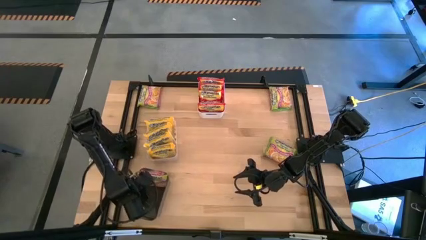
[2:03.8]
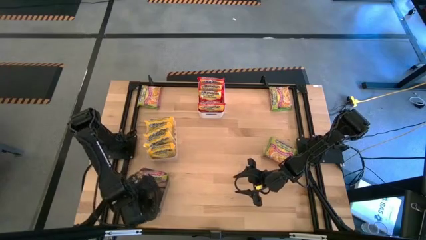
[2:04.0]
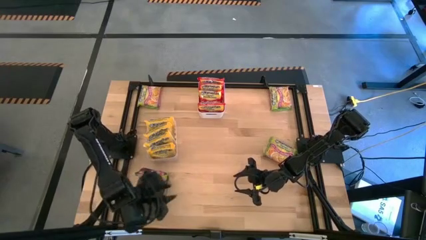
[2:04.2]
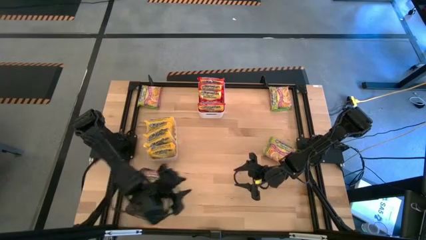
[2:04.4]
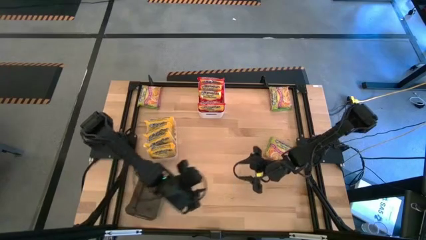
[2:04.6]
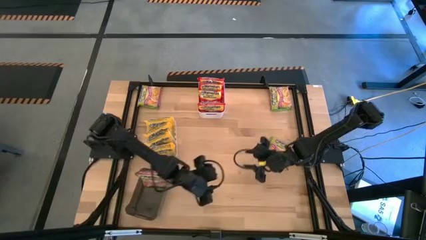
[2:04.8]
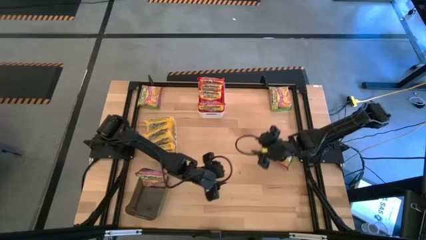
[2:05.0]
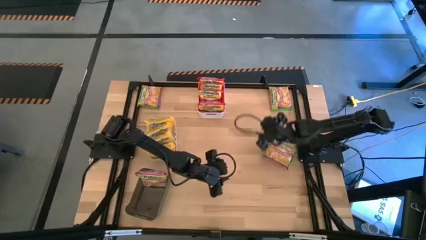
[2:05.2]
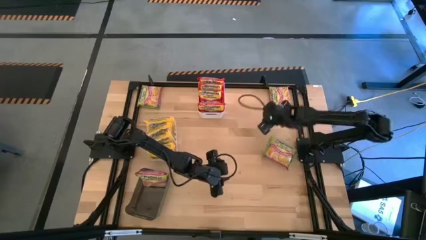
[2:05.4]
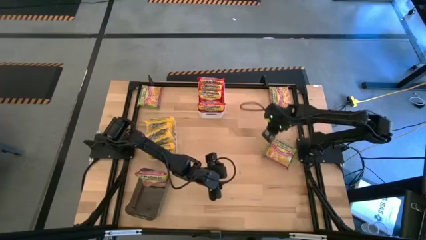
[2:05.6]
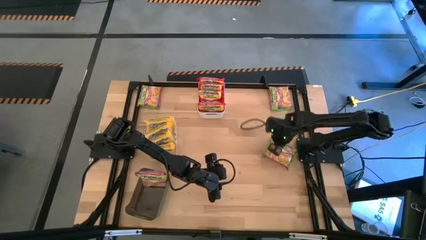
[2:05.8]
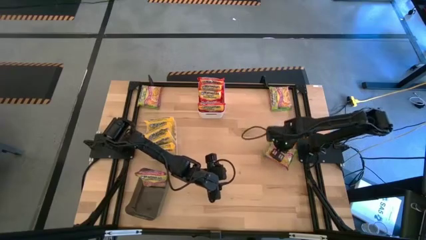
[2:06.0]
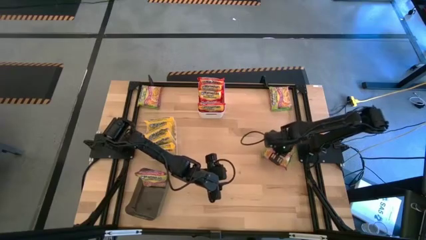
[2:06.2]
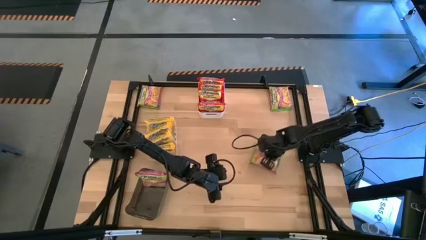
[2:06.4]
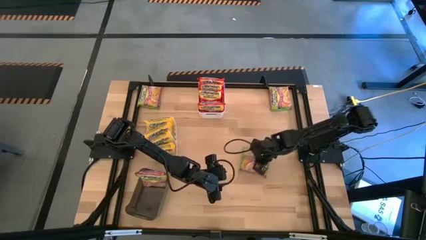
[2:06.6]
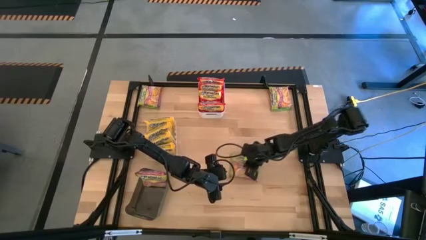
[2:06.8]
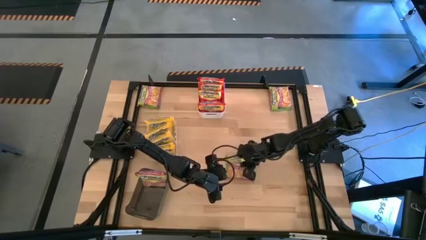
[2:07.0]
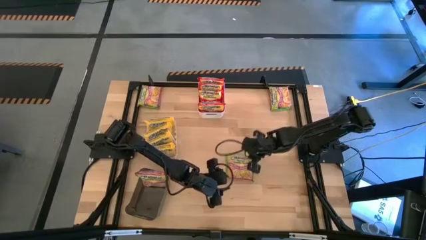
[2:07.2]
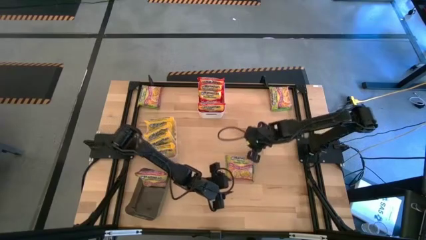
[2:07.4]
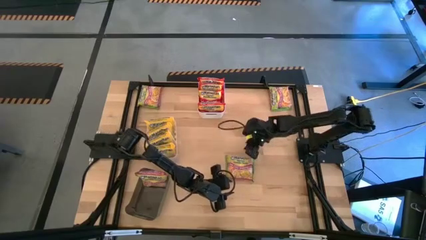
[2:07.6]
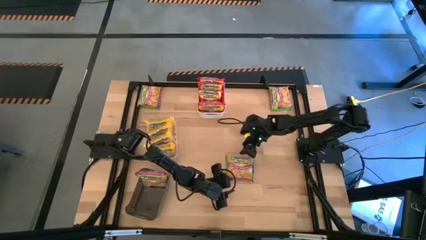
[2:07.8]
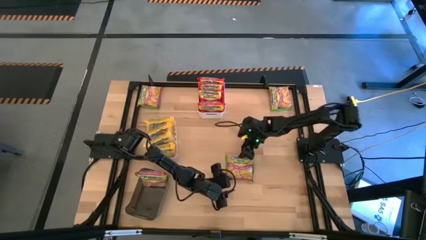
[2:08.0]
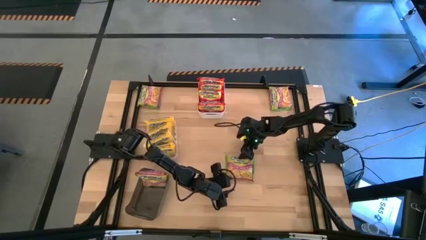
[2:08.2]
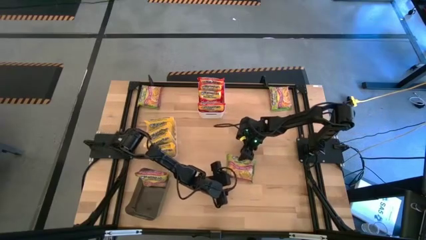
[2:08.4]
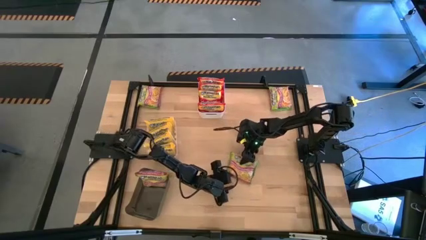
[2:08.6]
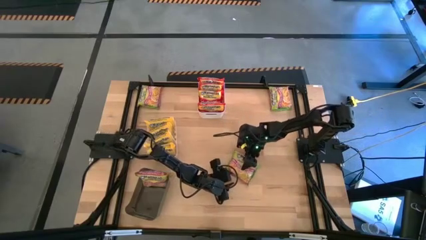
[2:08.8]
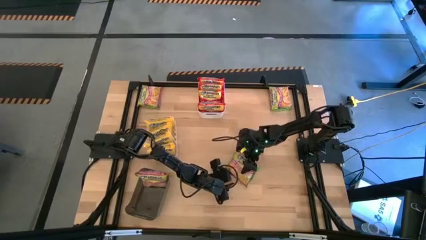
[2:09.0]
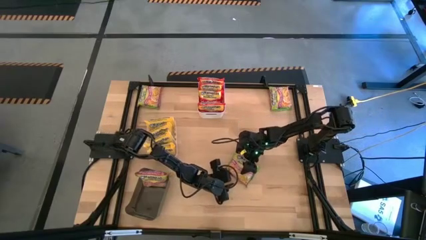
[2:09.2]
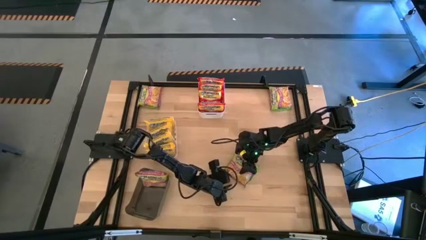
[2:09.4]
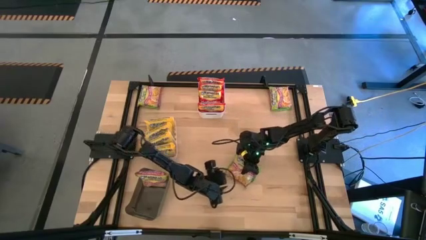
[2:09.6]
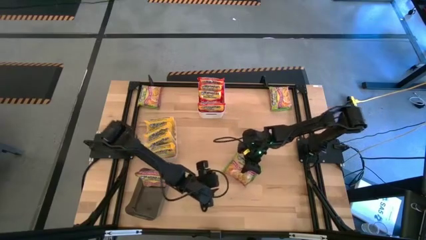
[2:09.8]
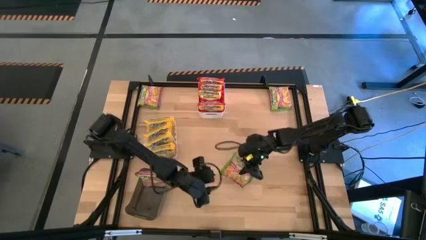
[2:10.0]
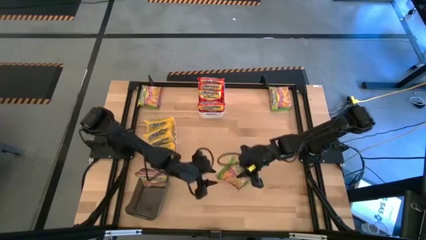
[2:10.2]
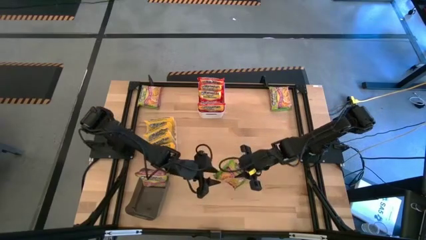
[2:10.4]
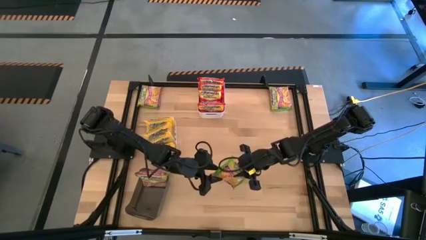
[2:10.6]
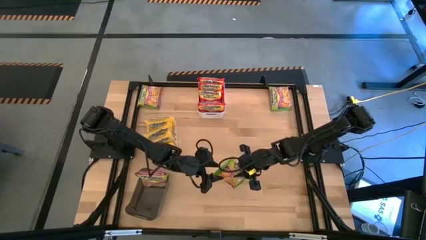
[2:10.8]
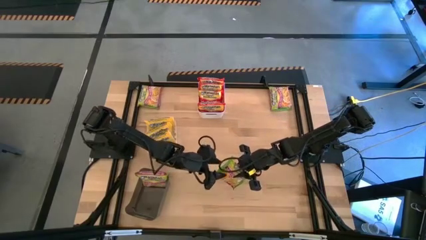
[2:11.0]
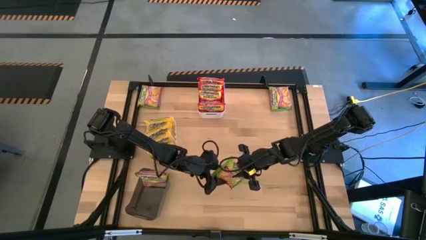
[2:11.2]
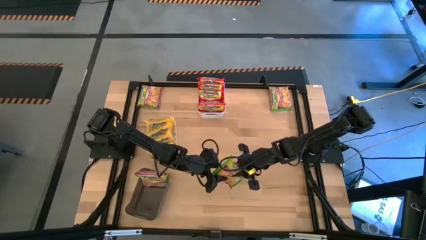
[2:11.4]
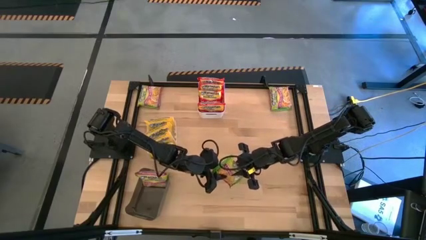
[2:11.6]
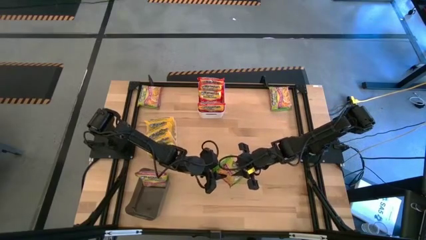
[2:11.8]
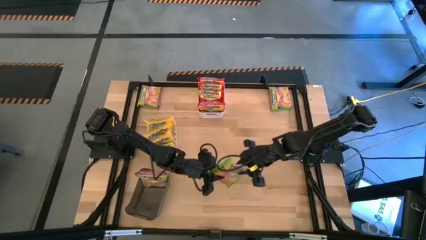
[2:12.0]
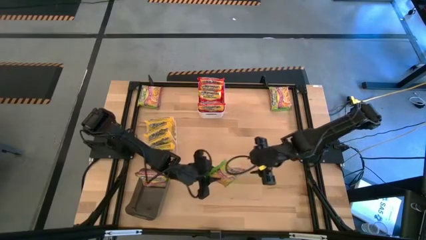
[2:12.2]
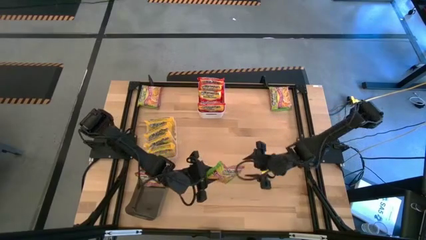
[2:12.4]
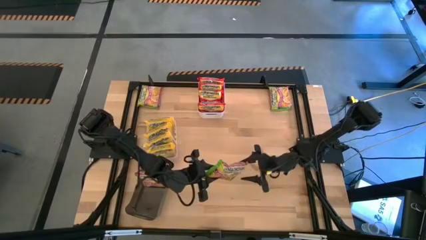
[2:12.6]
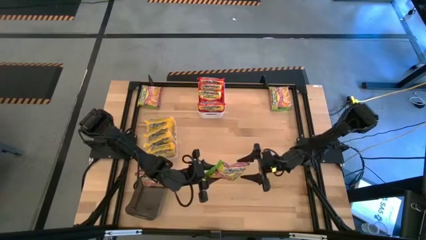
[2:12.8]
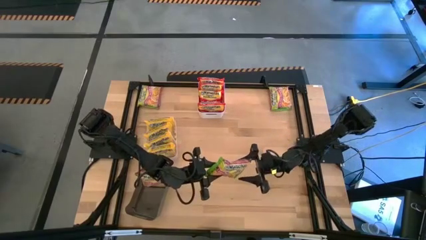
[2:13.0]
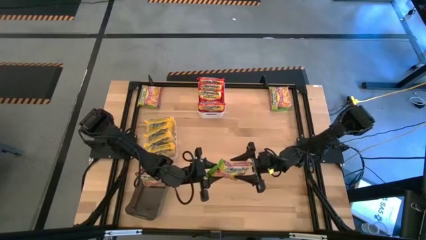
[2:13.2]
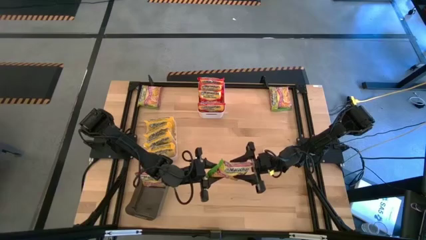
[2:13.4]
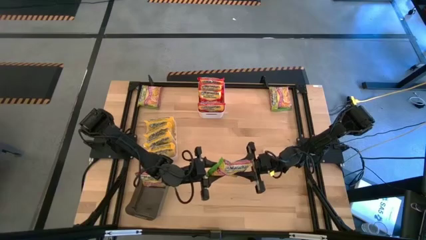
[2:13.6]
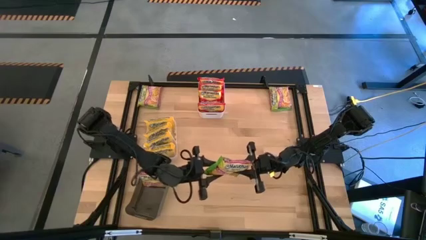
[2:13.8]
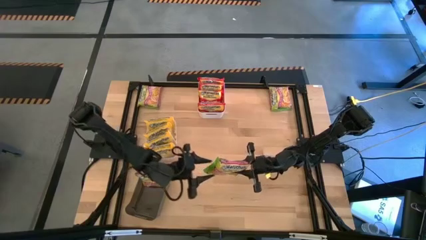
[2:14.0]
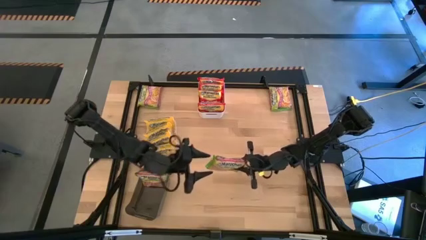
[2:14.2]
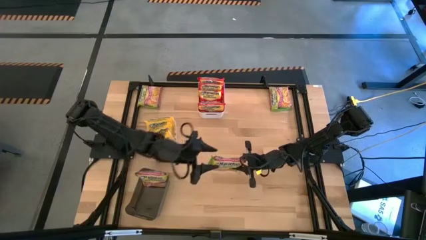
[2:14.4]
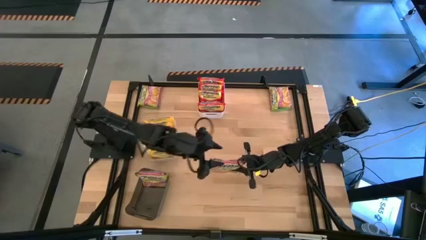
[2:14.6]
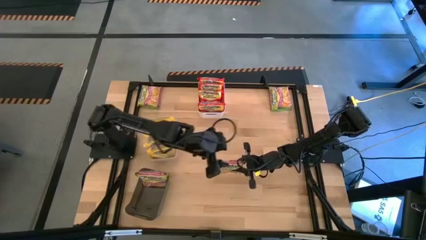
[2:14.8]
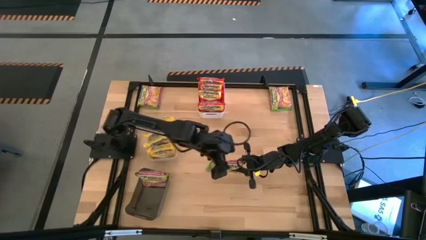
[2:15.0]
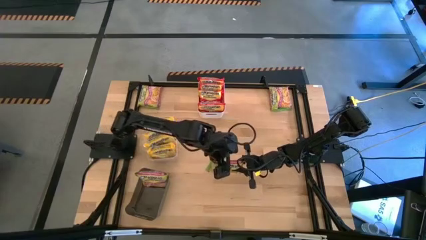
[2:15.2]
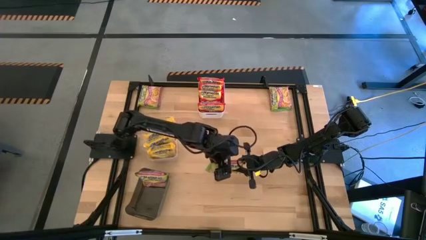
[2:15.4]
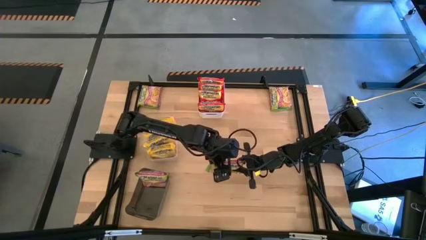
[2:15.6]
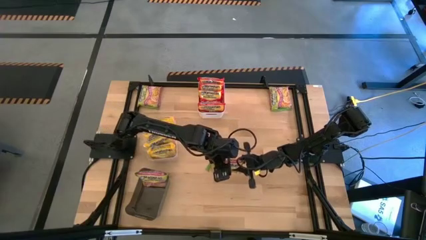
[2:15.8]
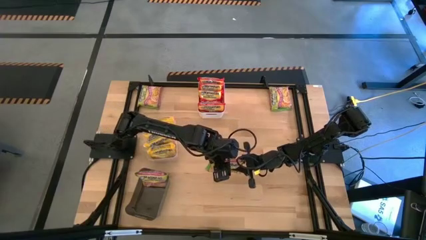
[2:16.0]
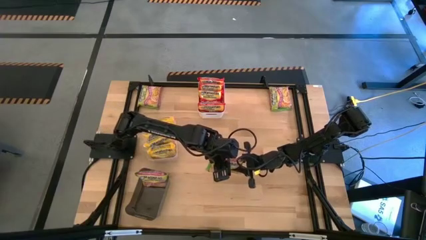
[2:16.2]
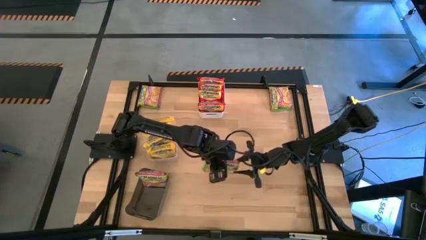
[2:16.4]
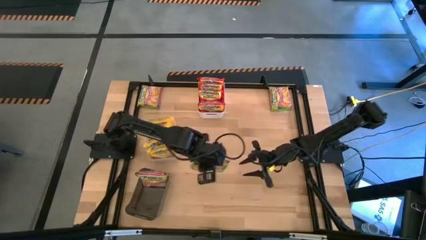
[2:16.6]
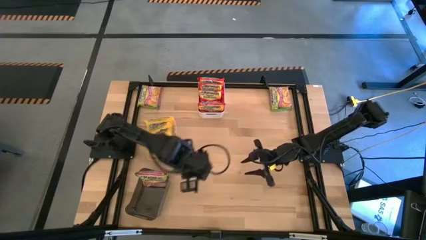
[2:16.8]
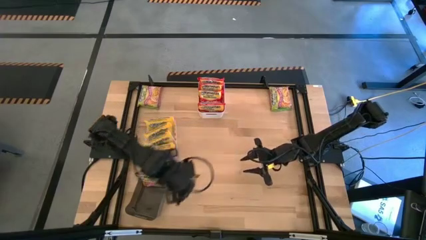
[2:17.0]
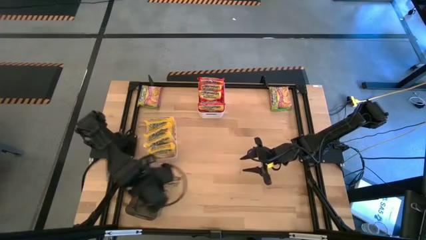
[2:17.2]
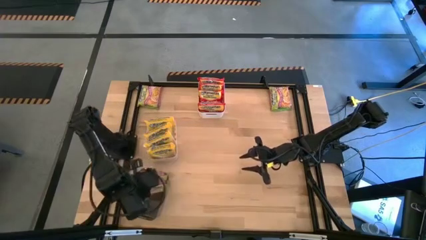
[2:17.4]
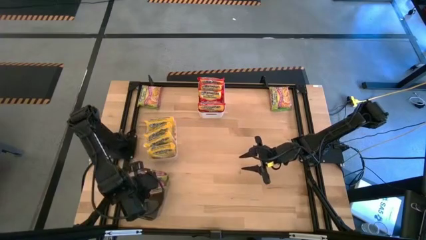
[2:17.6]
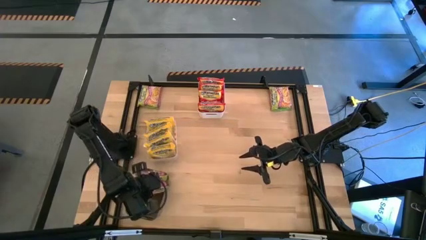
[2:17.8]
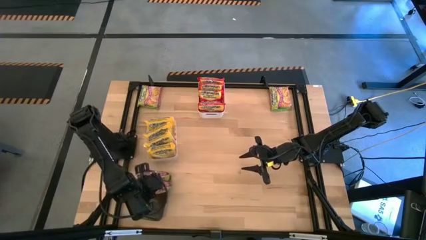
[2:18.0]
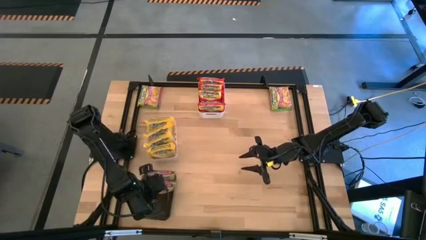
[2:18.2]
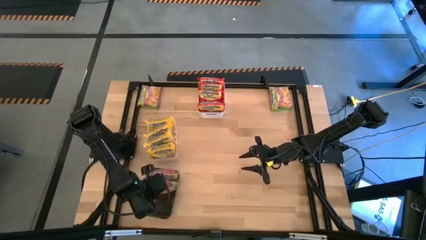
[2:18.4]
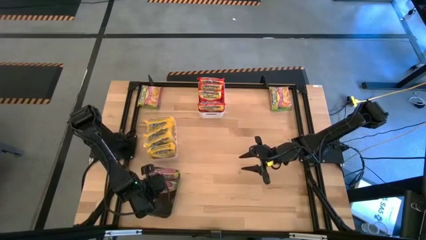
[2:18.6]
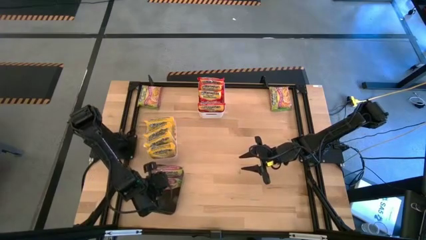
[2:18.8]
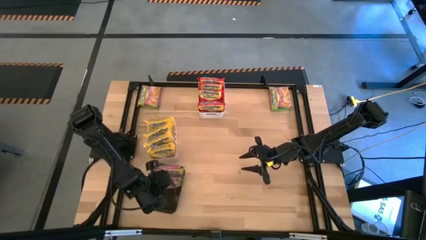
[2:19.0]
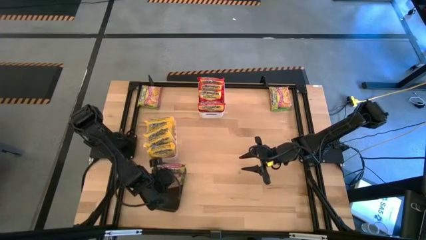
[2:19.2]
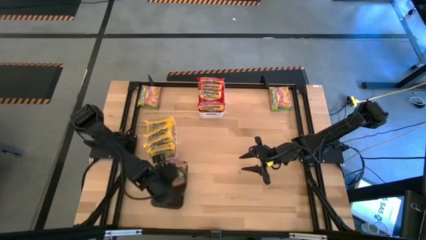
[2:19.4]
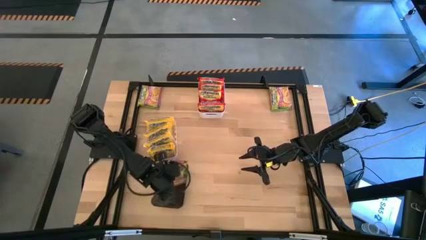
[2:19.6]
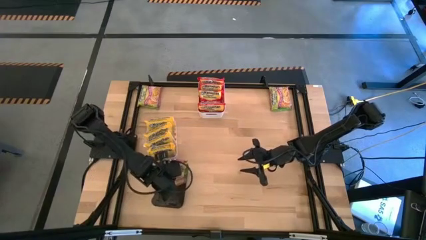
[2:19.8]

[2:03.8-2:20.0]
Task: Sort Maruchan noodles
Put the green noodle pack into the black bin

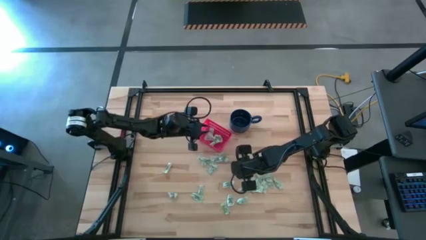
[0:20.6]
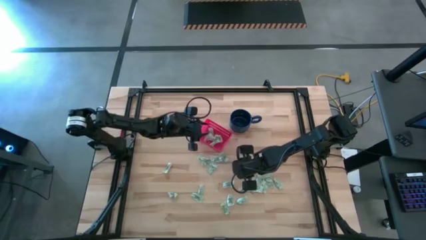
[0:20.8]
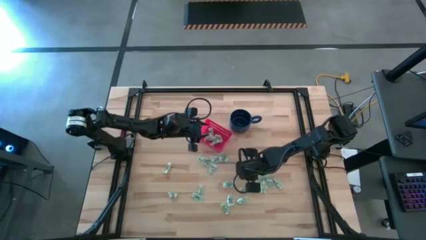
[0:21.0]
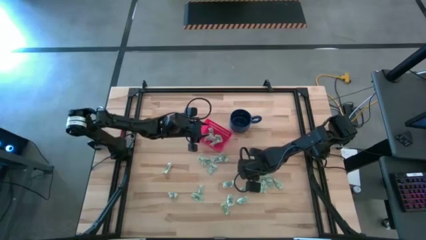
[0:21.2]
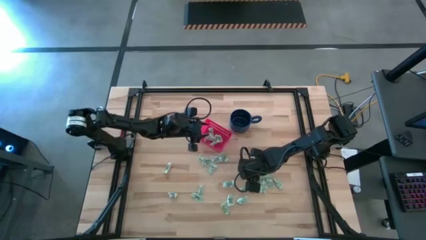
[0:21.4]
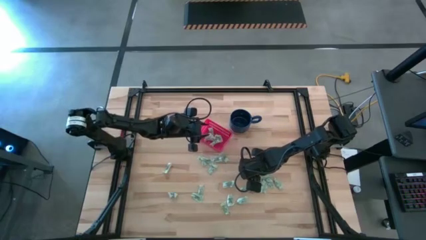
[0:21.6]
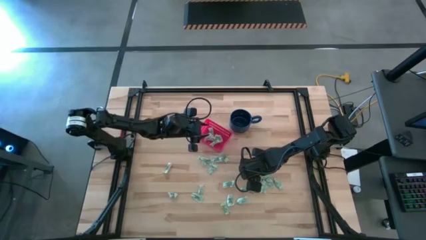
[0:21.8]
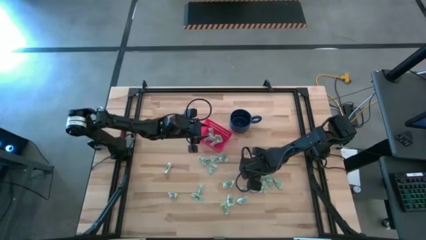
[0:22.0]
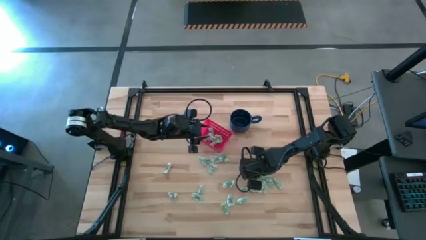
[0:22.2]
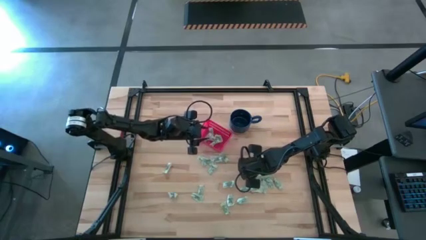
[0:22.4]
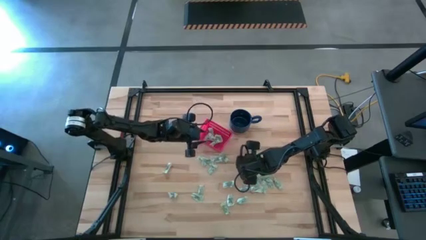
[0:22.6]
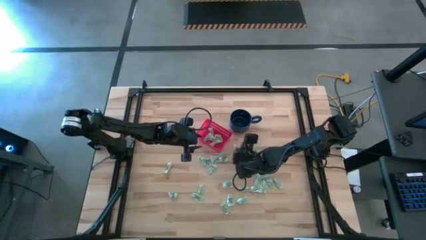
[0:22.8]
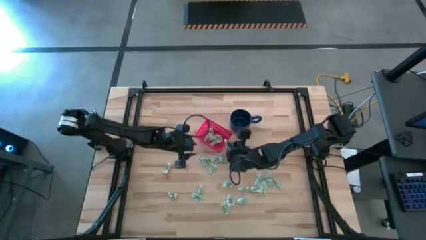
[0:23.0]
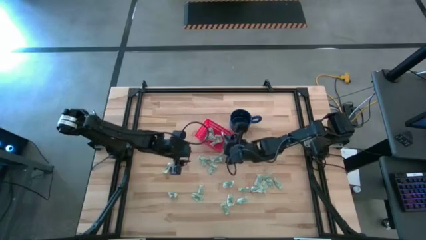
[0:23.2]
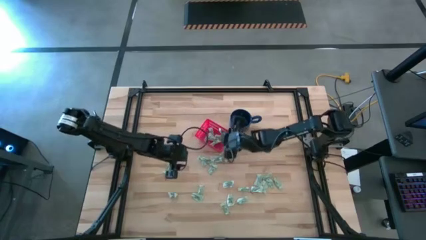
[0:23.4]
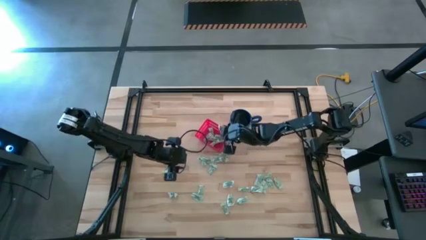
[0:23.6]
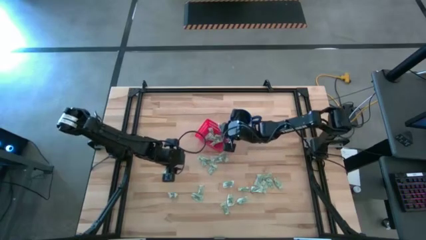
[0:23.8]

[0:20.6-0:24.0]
Task: Pick and place items into bin
Put the stevia packet into the bin
